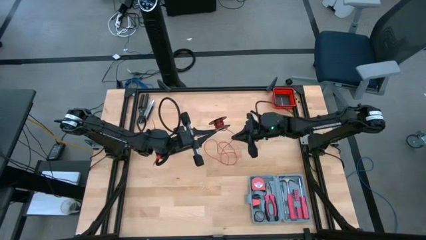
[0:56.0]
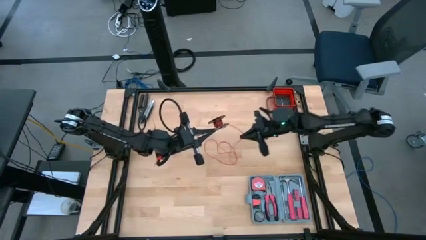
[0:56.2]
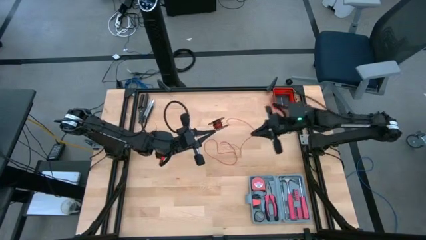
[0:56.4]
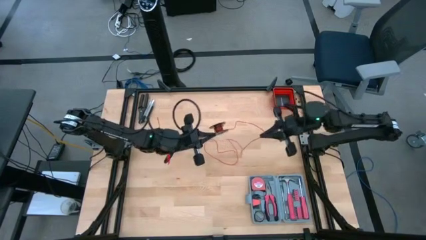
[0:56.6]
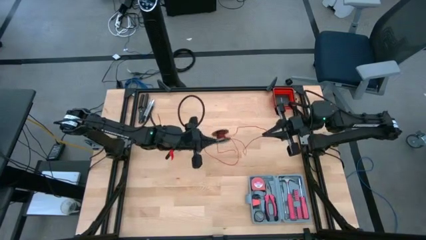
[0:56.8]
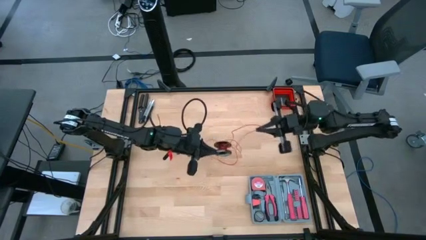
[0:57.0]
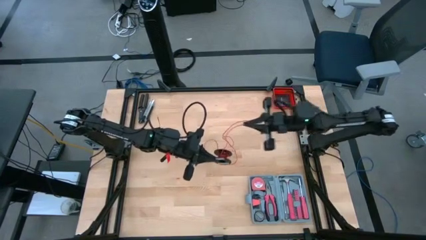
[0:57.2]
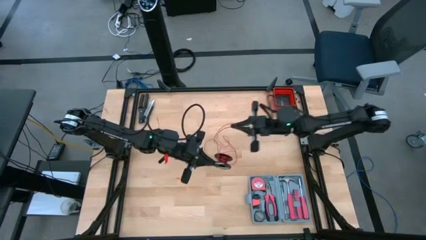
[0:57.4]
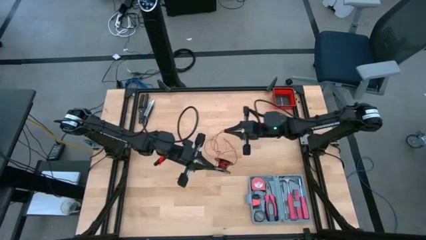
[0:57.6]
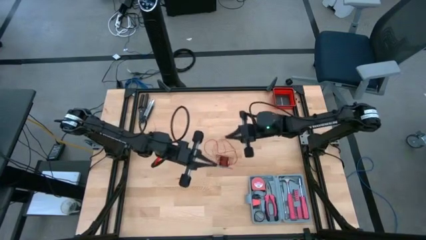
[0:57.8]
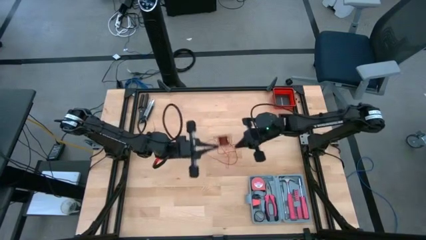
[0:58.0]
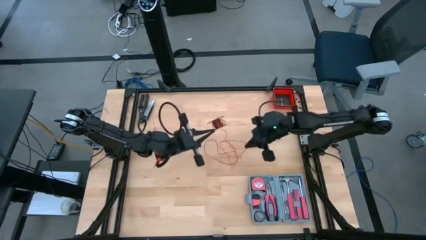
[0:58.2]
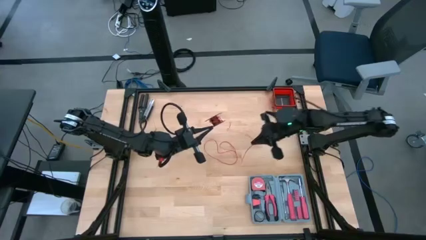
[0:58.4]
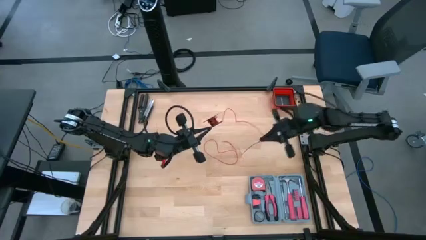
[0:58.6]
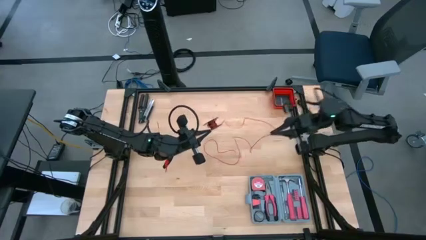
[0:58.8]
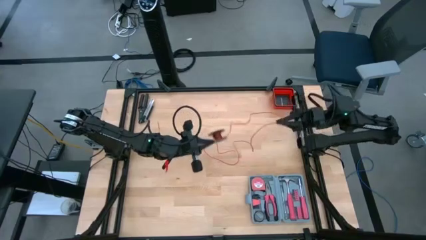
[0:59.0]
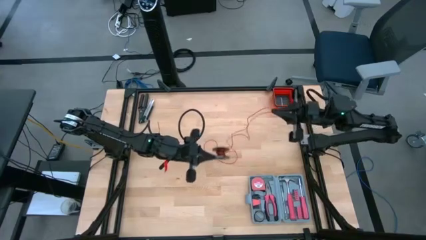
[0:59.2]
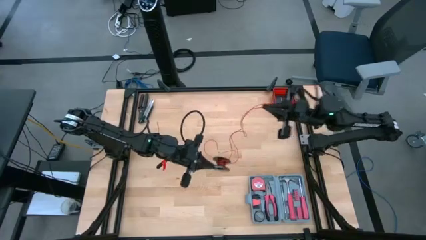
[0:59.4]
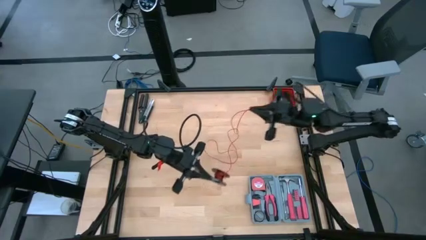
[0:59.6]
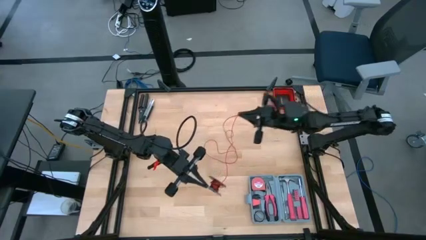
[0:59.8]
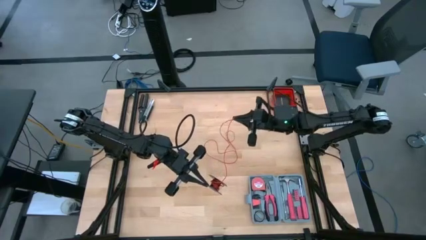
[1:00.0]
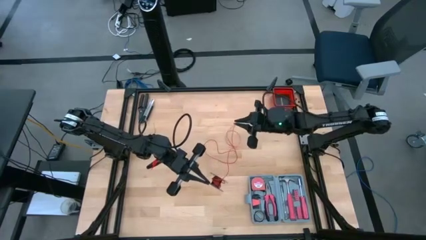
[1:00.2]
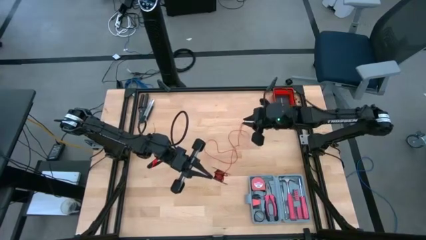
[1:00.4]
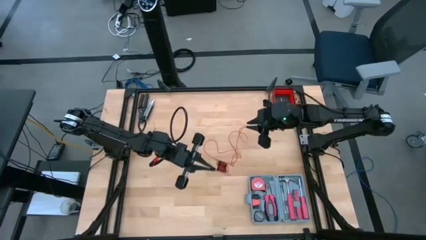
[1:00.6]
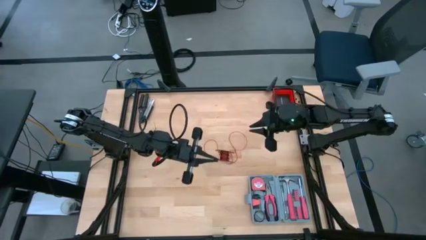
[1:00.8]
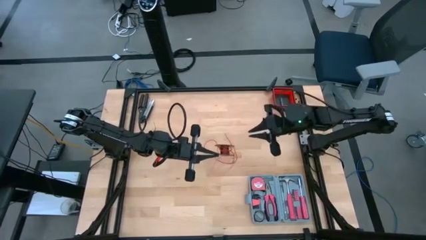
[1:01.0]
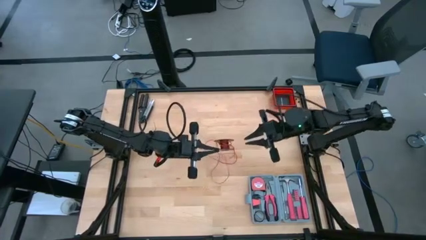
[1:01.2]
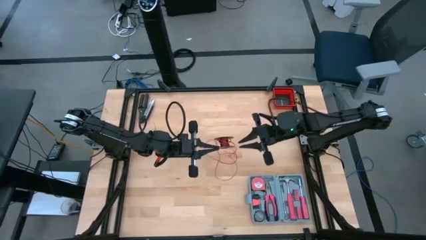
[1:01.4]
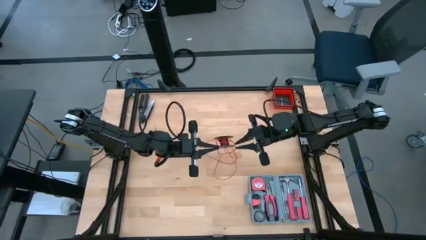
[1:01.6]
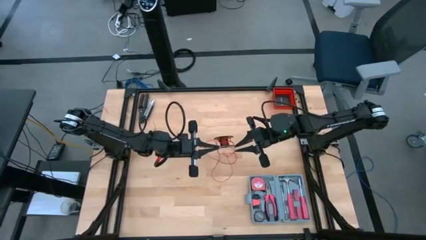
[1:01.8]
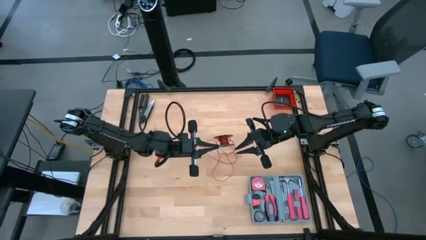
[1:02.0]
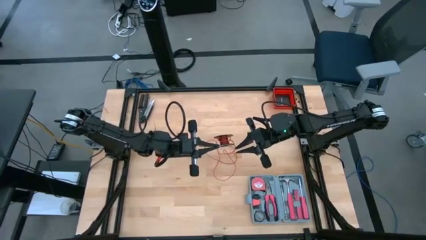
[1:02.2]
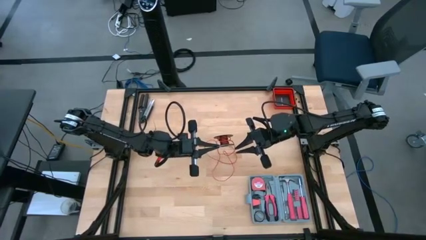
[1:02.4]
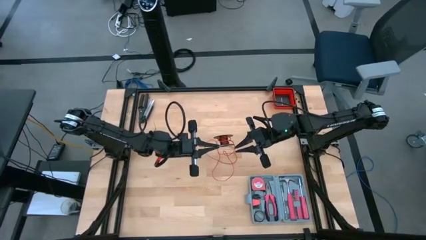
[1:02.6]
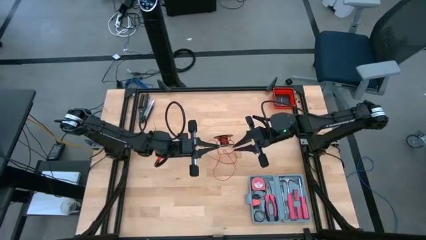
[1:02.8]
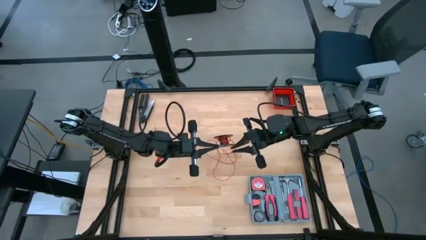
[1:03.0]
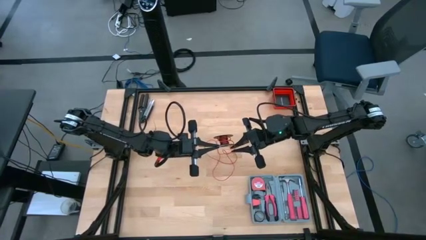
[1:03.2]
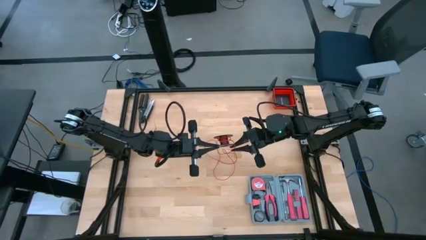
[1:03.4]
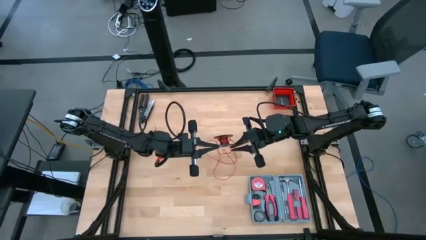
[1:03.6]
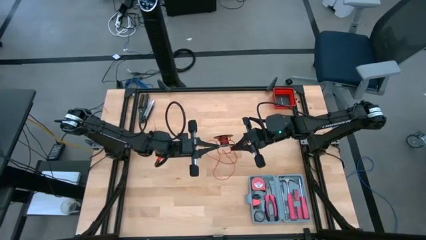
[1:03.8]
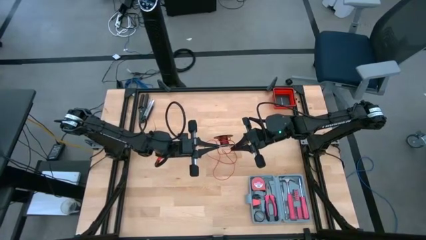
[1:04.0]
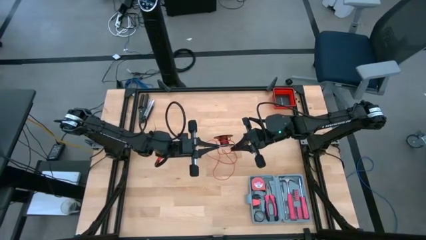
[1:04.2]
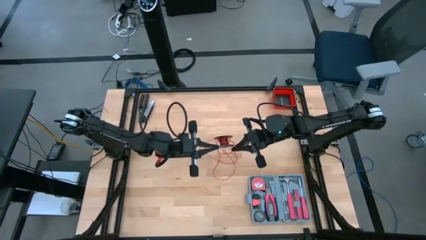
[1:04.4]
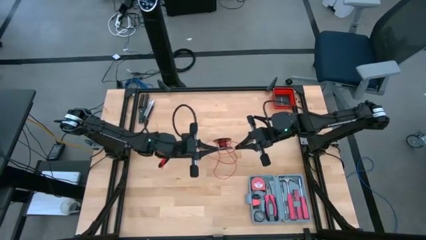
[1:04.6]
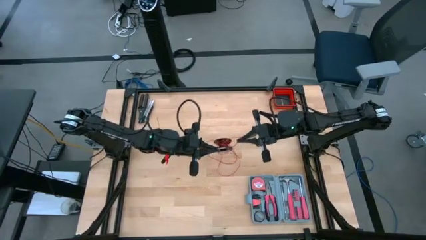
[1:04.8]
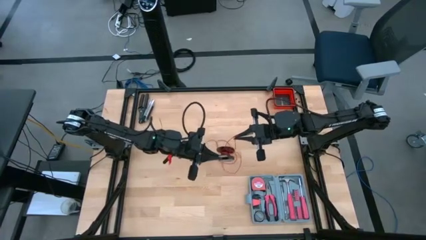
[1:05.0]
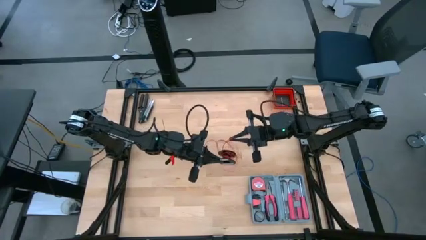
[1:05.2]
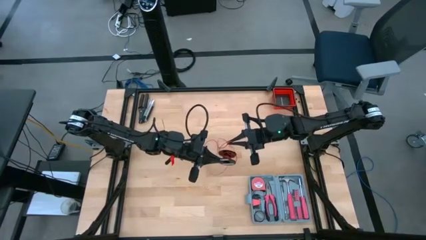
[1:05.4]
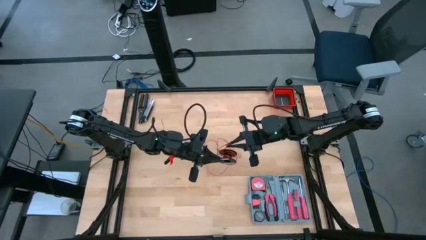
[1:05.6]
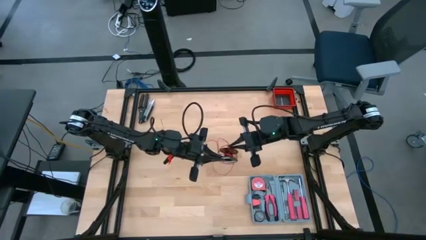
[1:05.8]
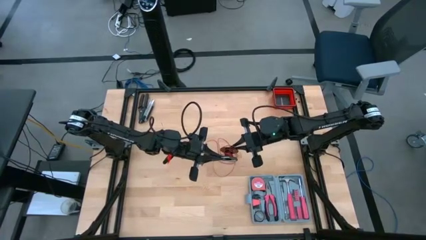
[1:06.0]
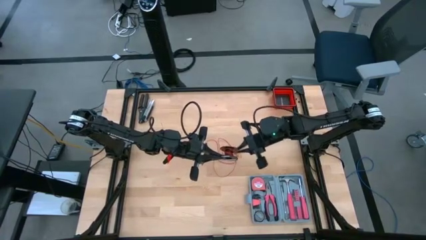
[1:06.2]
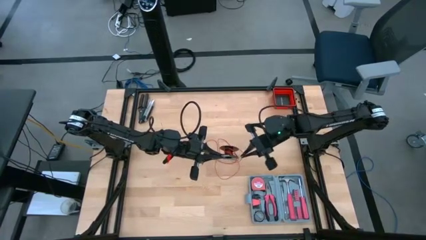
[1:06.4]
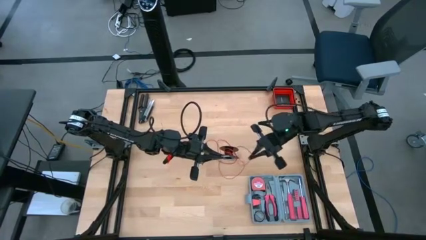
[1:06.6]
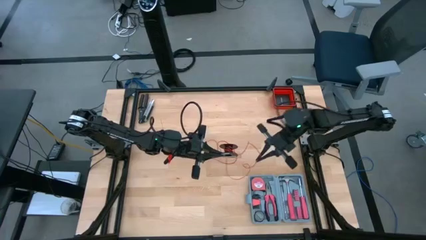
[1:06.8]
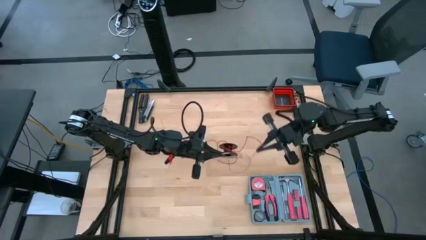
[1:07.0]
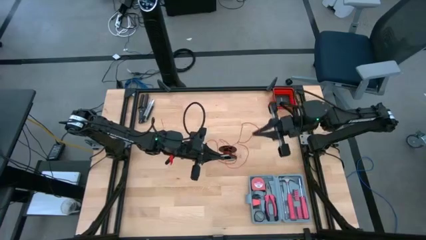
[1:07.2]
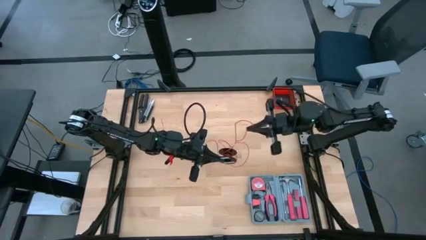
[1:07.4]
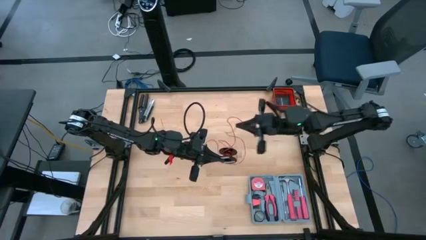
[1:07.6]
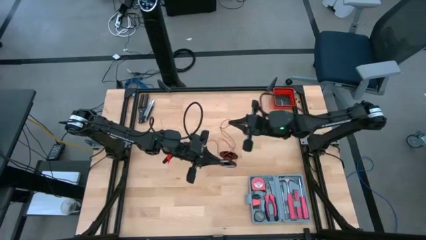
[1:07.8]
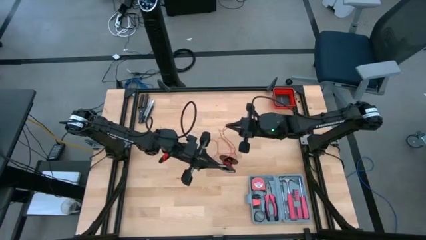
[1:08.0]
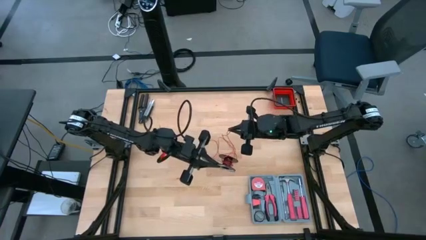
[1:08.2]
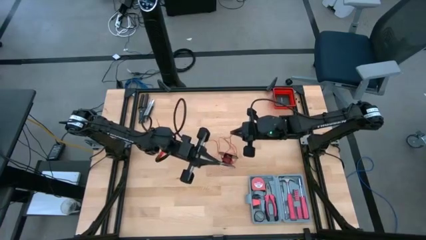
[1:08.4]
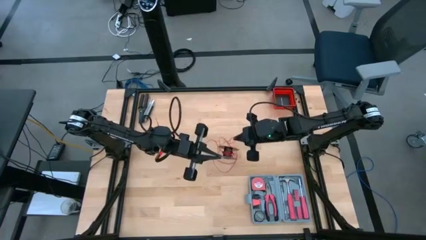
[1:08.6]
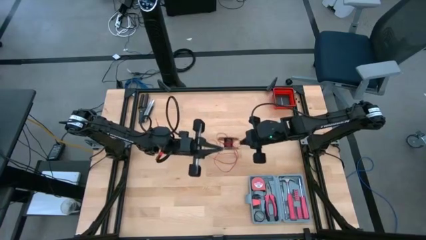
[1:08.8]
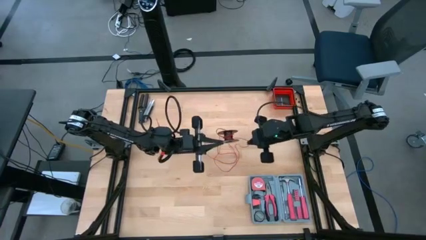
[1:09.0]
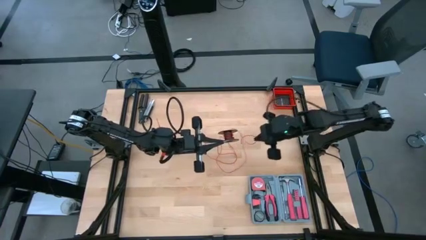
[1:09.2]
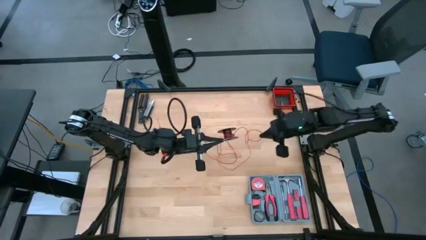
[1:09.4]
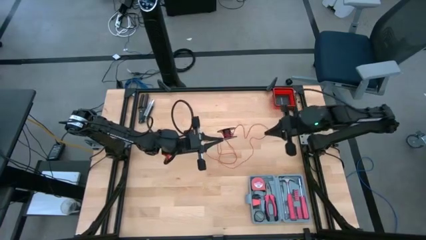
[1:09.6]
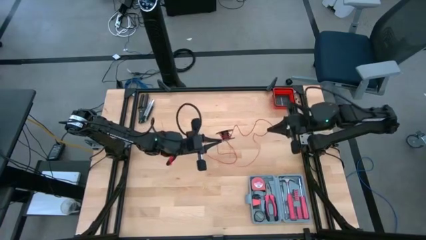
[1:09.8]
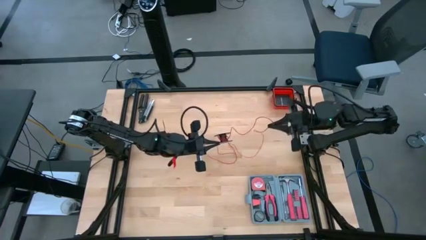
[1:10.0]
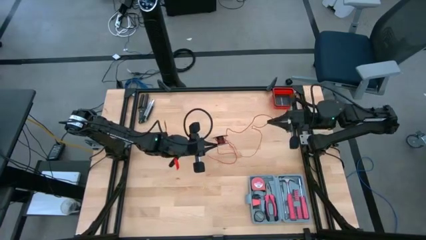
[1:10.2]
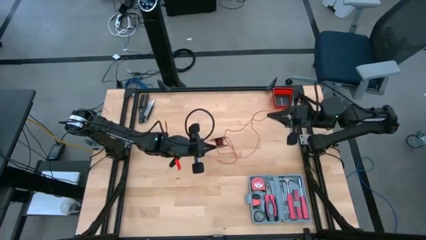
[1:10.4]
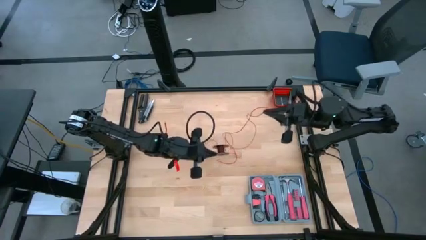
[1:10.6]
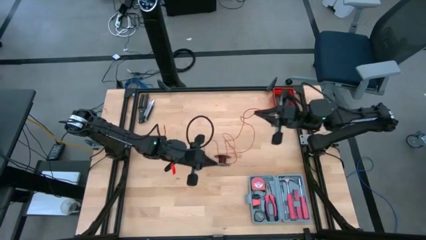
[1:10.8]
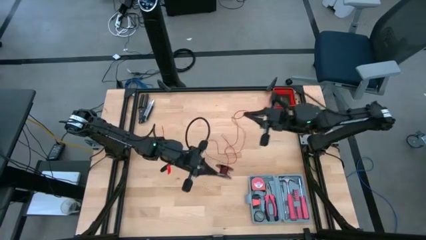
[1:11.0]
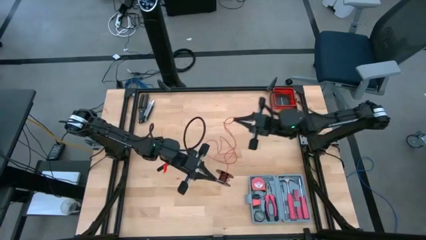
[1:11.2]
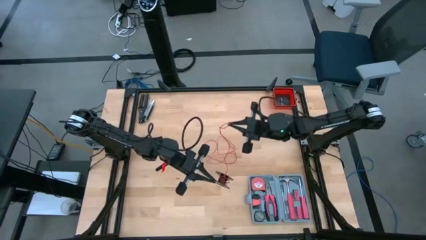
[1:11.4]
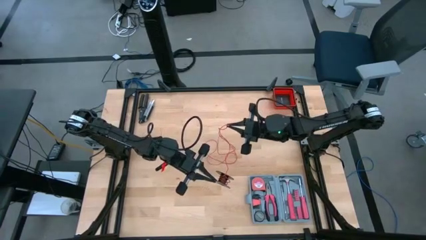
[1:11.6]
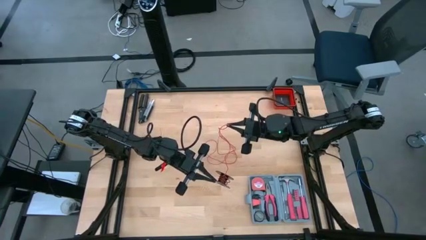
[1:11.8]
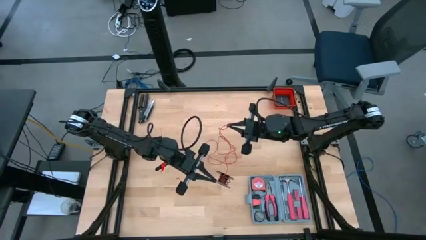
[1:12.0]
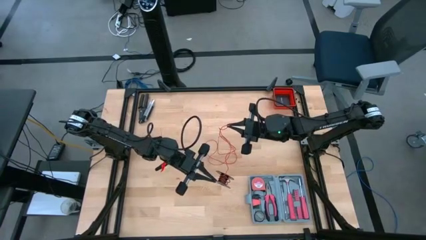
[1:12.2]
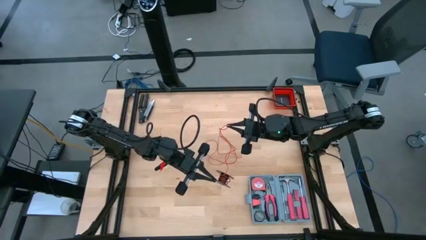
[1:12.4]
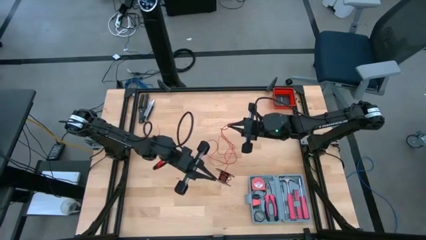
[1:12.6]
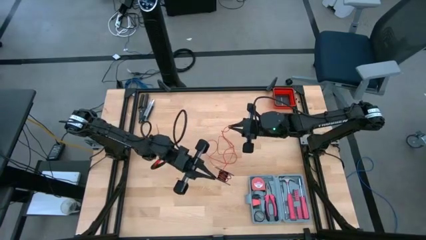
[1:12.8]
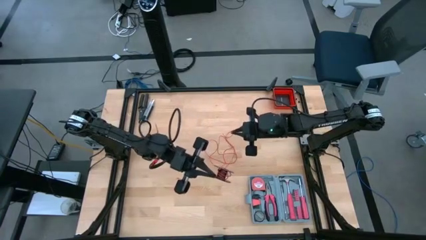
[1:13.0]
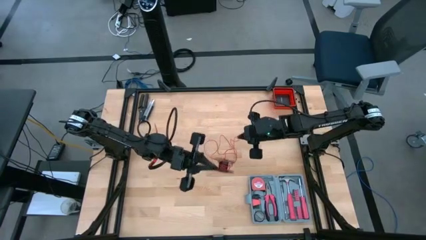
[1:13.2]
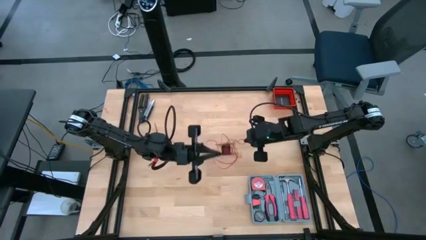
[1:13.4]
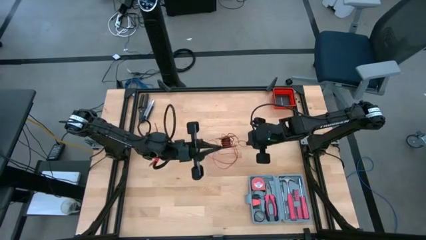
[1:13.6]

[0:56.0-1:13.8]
Task: Coil cords
Uncoil the wire
